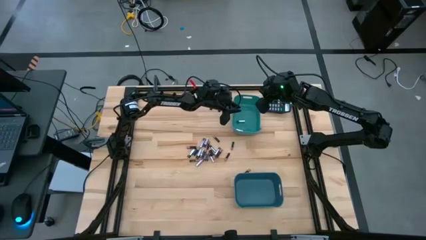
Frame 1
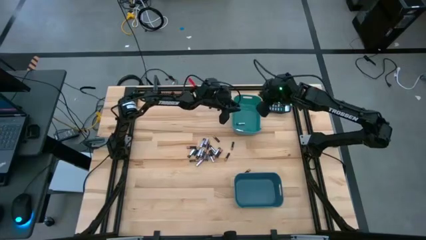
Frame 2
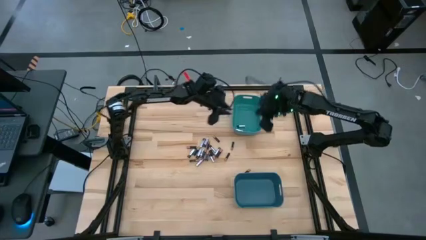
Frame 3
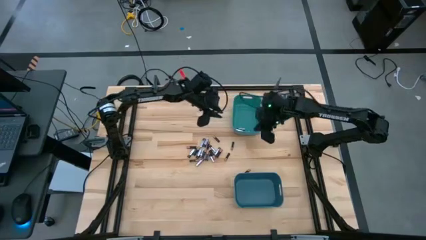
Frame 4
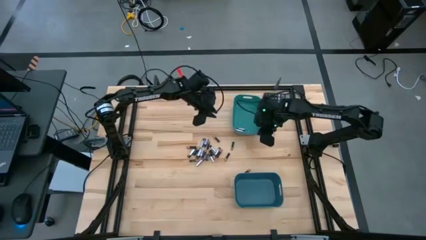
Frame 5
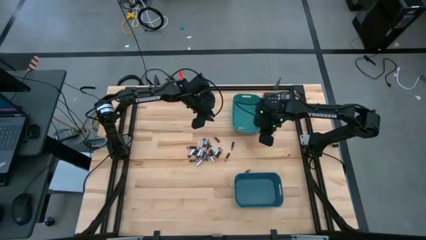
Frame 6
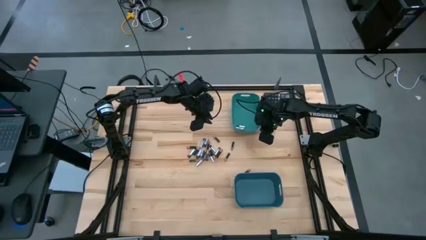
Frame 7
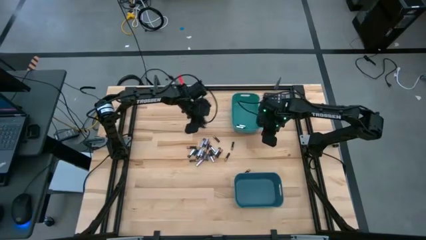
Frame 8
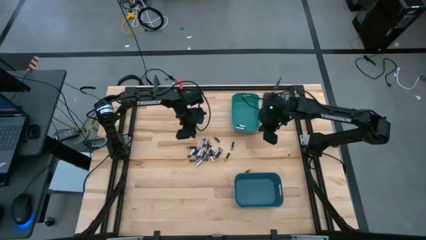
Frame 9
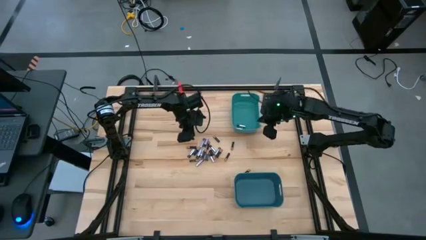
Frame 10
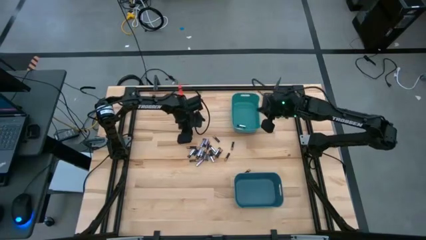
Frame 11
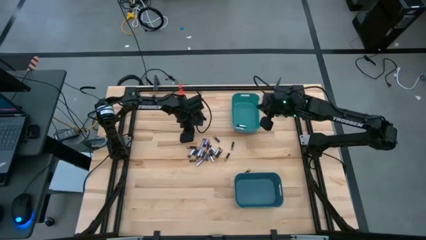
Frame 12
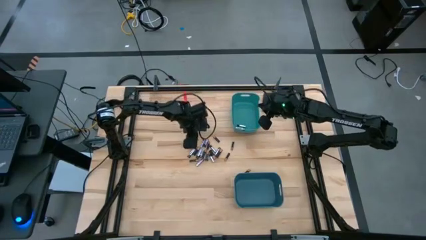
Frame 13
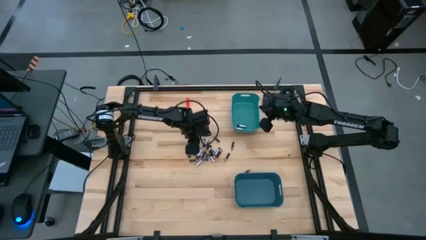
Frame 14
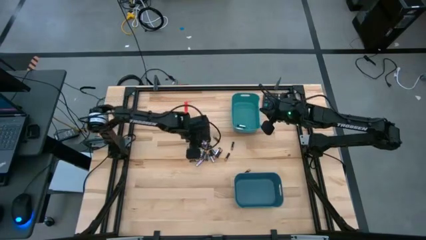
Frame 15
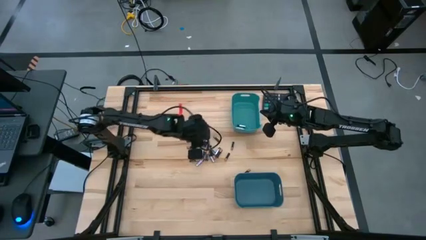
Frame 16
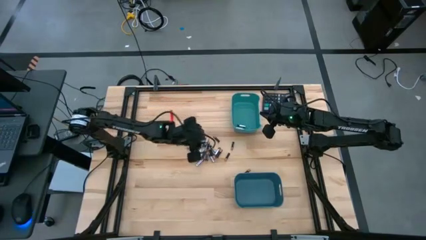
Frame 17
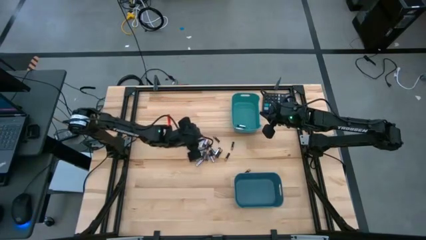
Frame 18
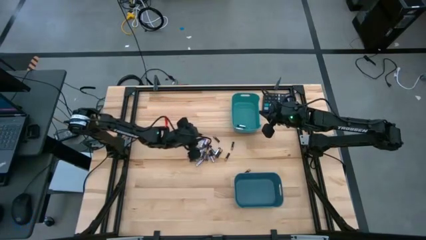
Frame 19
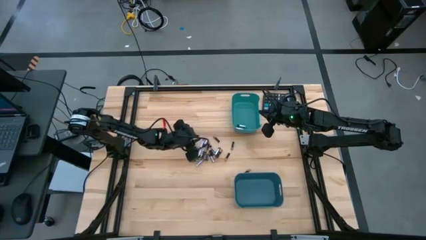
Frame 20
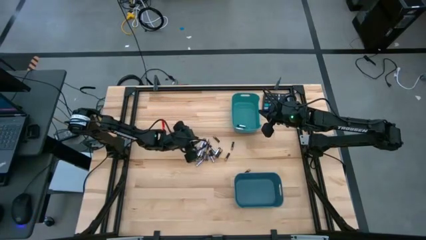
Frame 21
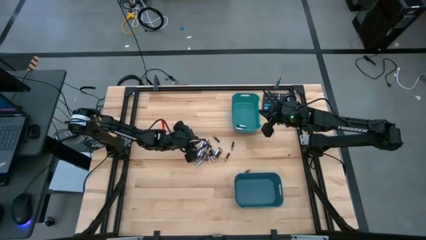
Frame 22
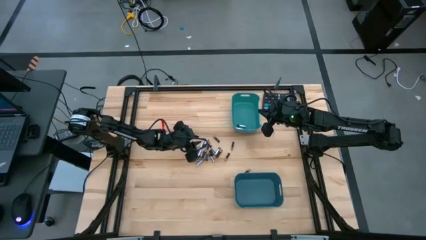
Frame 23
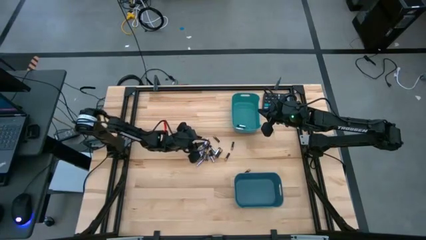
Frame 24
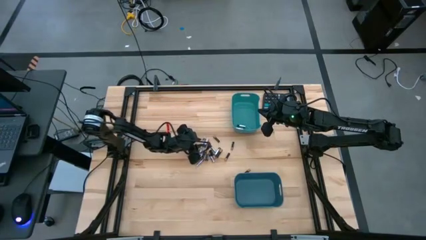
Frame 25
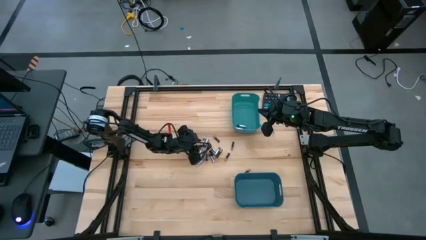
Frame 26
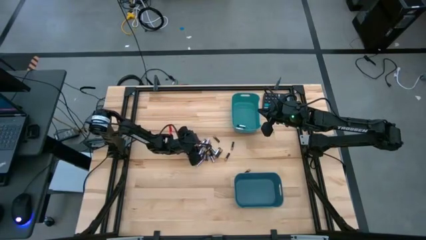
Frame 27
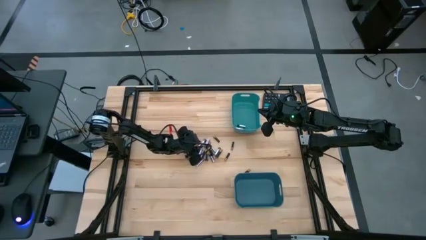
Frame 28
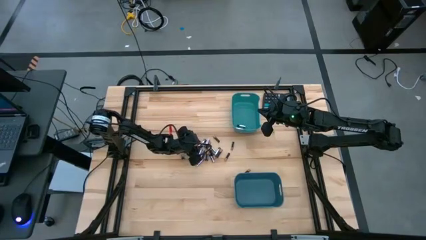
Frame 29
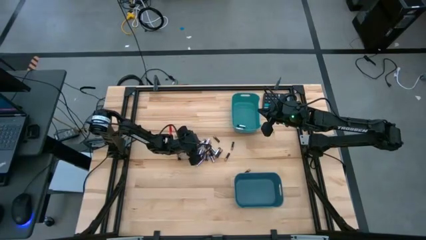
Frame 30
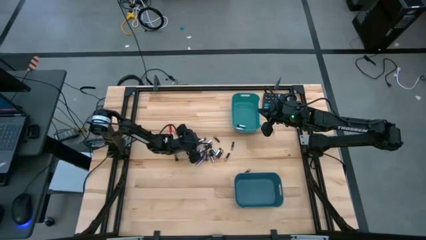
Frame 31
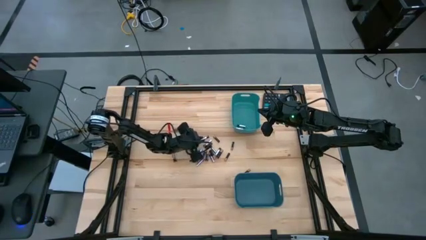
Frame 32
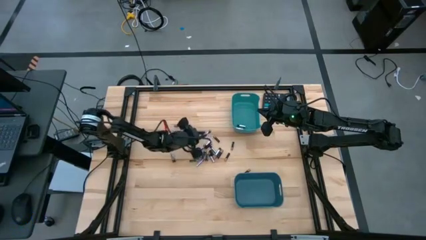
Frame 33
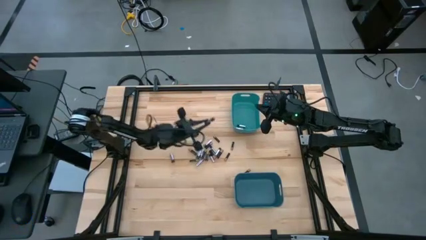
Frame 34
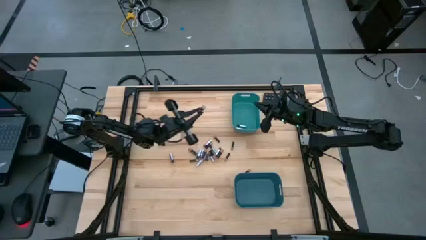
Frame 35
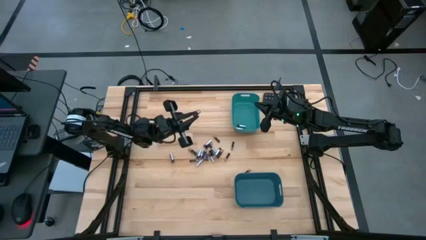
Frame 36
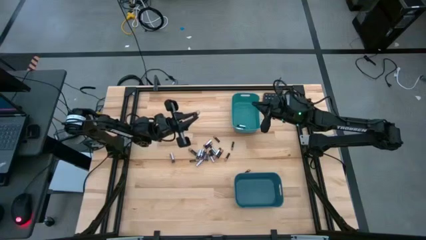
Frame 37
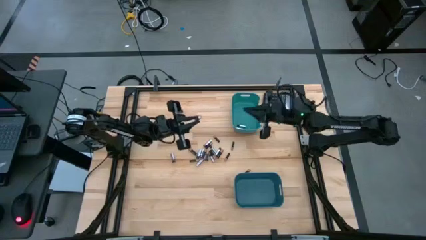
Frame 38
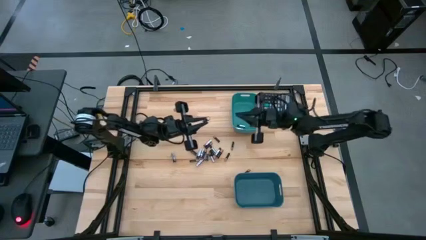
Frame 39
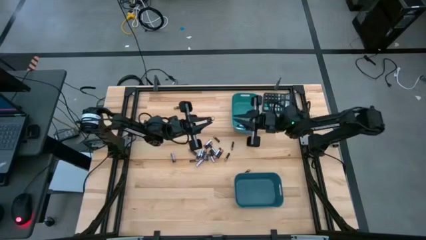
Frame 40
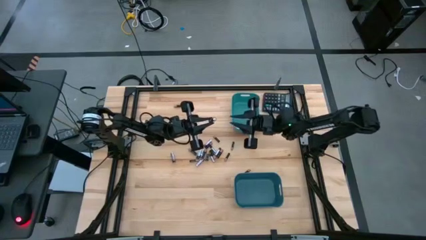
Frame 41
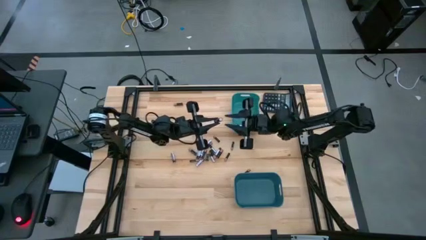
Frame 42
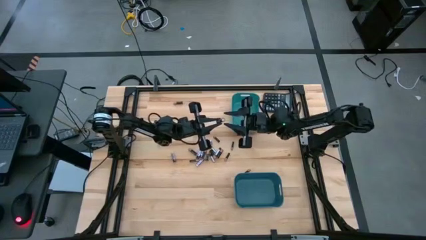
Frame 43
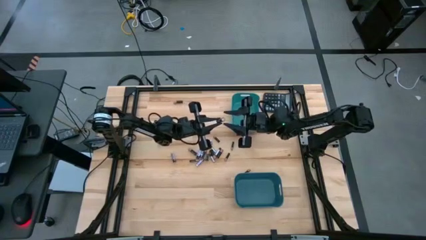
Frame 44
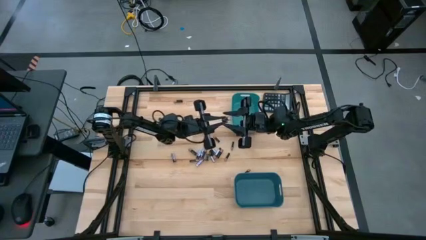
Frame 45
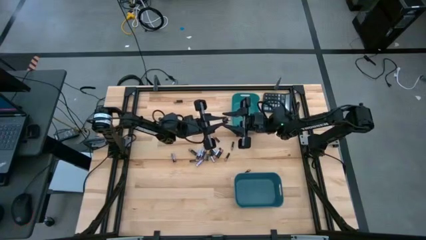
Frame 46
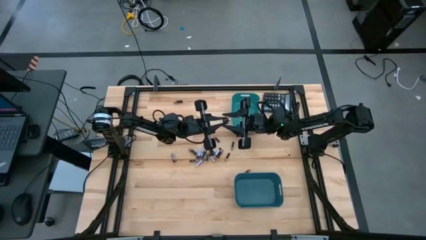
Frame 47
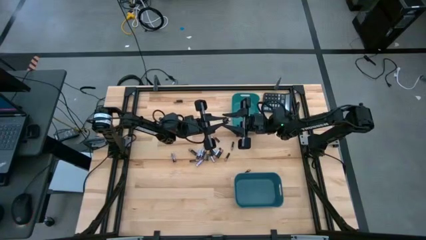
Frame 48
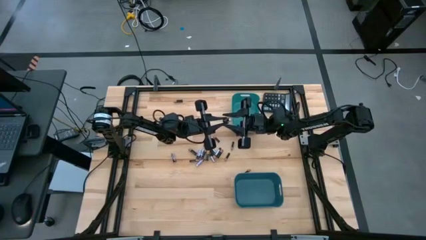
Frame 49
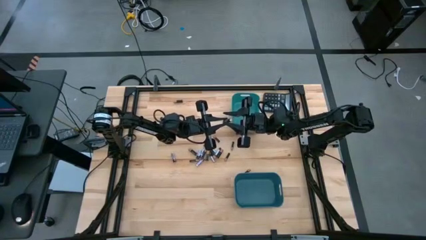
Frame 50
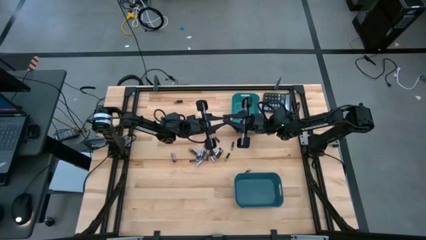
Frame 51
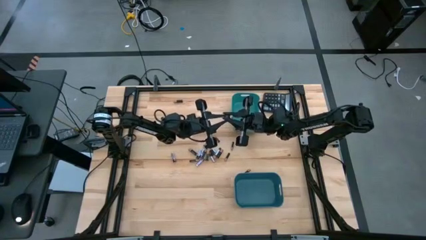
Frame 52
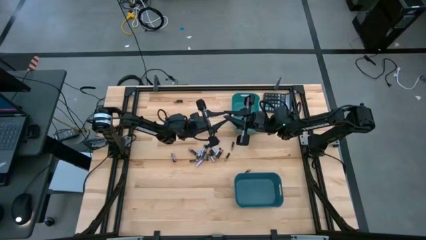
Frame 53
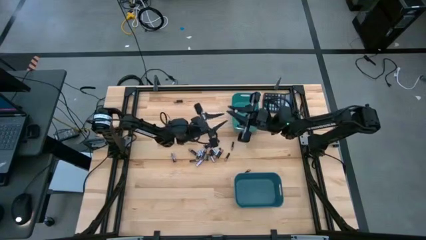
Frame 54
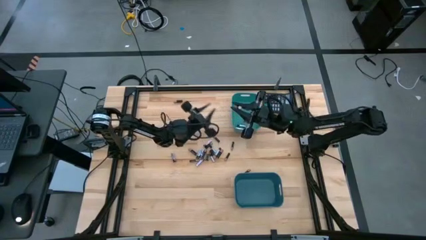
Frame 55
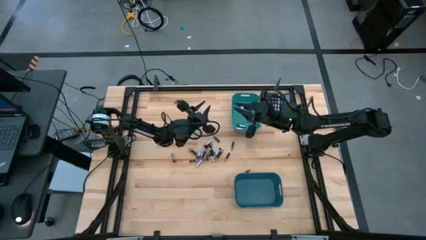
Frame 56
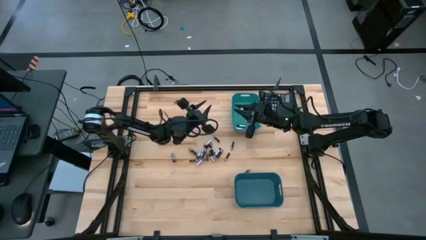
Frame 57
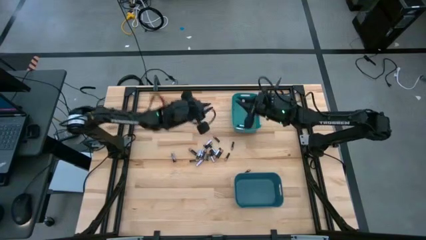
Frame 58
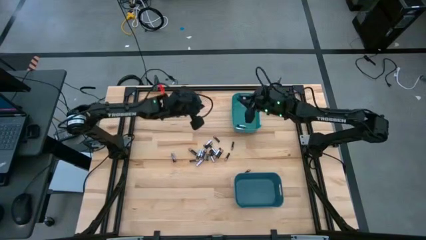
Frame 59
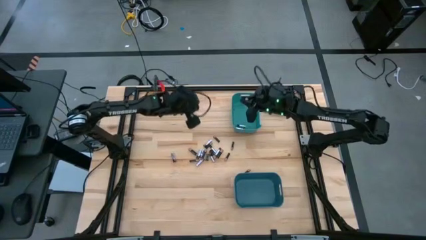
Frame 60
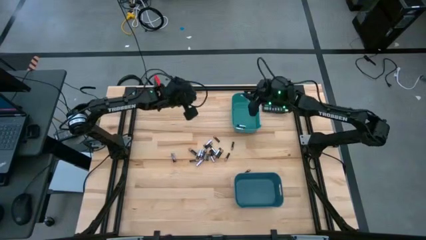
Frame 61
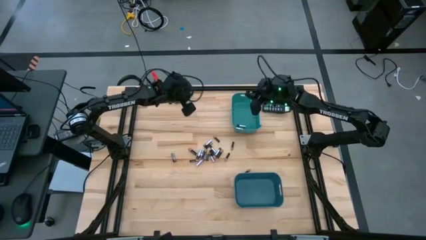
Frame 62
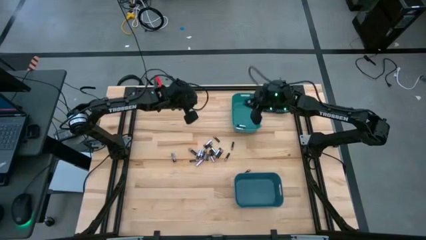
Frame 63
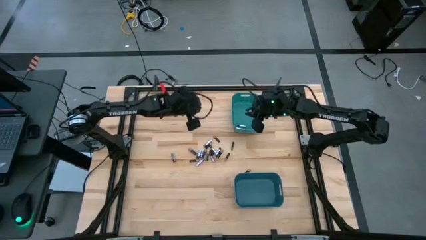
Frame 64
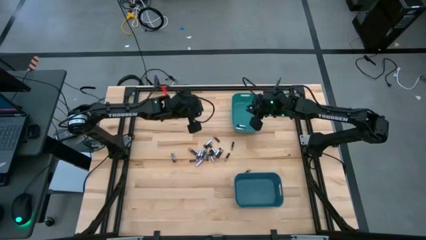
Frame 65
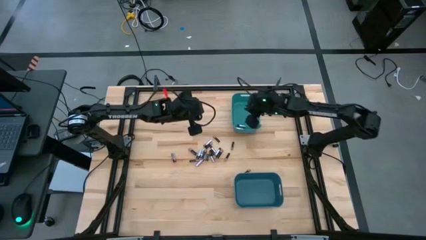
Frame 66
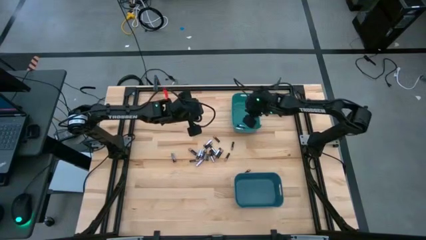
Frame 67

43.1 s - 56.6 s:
Task: Sort batteries
Put the silver battery into the green bin

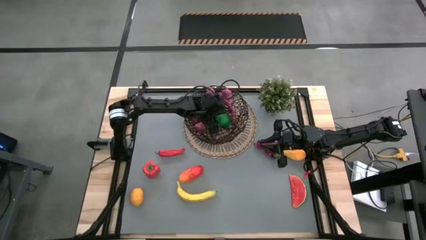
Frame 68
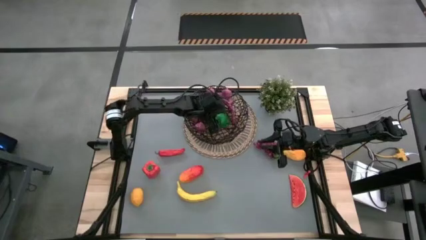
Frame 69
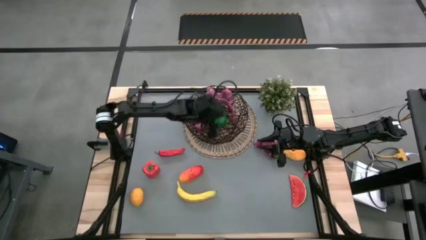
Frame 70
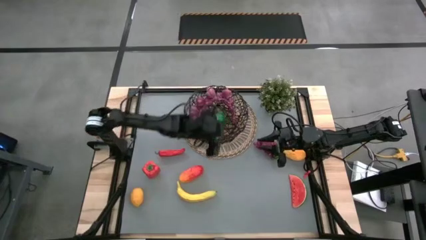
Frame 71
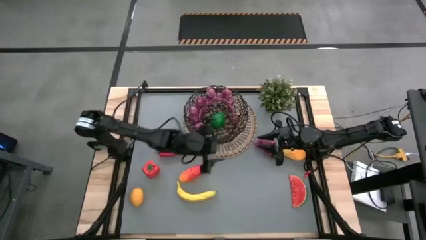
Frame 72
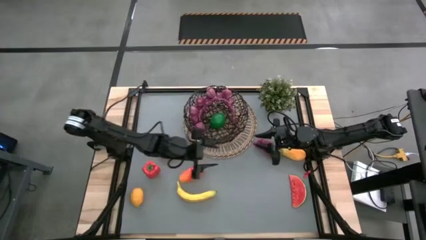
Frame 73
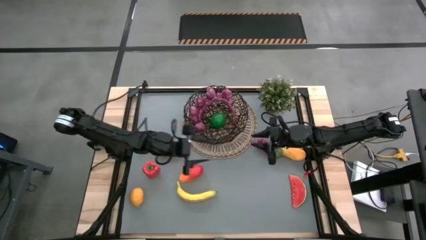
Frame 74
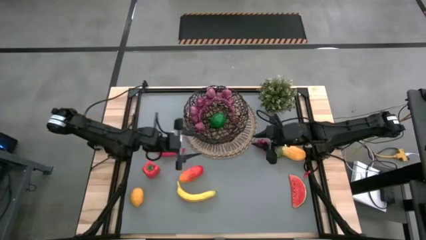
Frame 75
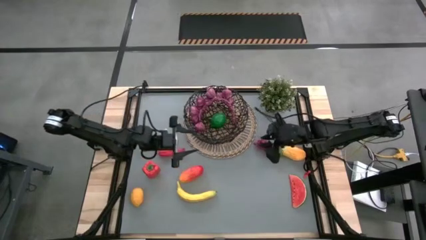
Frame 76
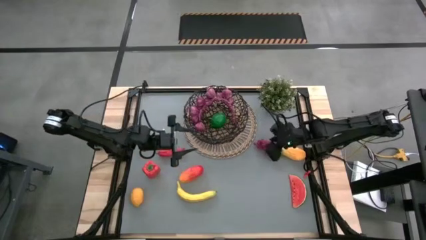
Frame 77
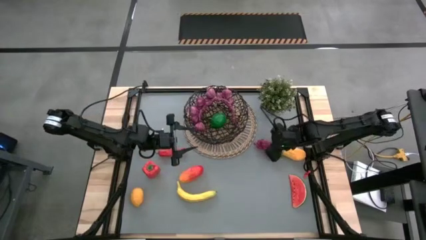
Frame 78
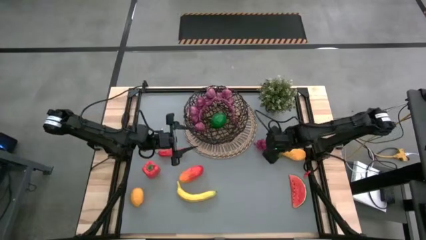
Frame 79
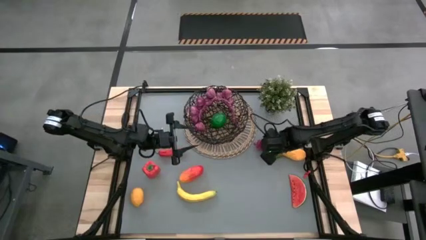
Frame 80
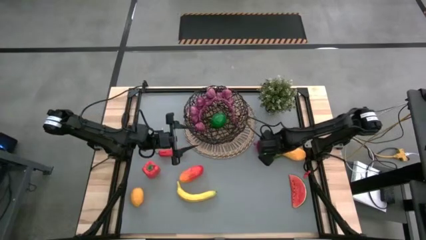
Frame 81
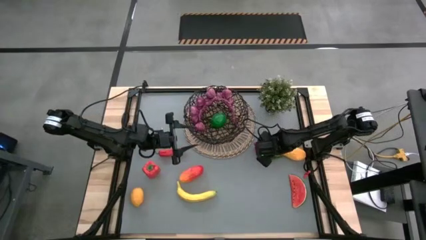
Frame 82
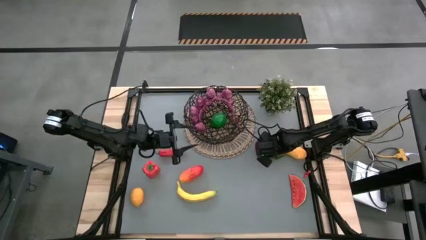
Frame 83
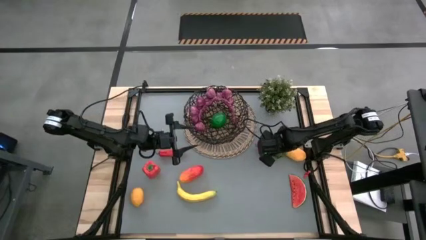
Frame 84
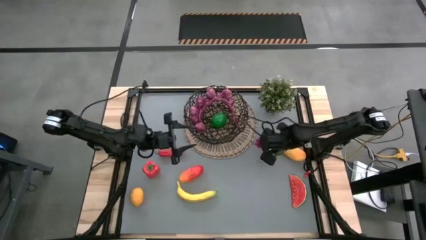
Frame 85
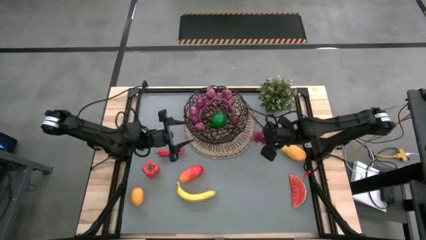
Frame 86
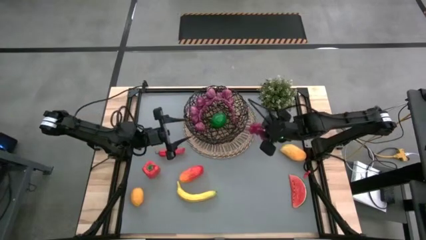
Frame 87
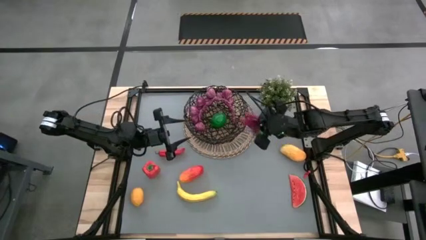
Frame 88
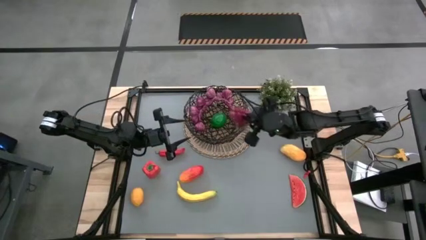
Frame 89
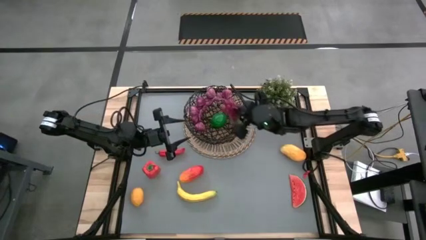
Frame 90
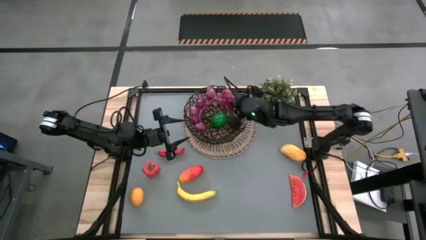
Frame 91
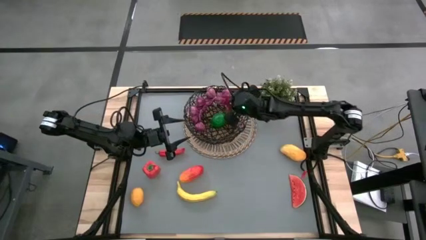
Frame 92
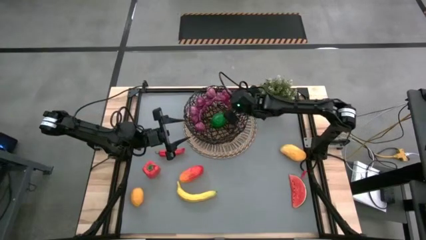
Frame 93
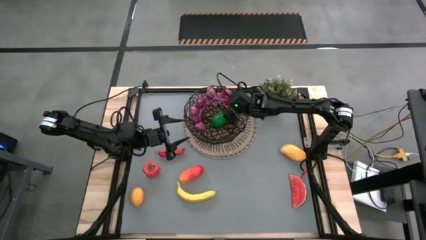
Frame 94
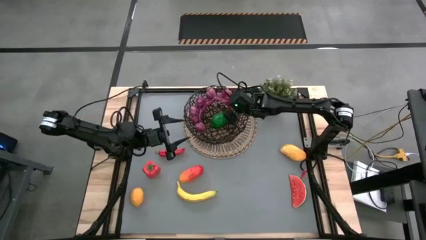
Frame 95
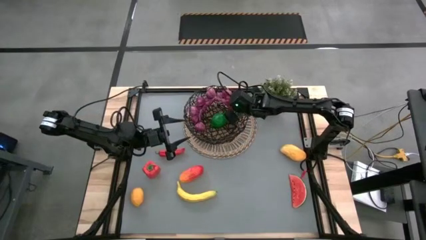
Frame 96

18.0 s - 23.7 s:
Task: Build produce basket
Put the purple grapes into the basket
